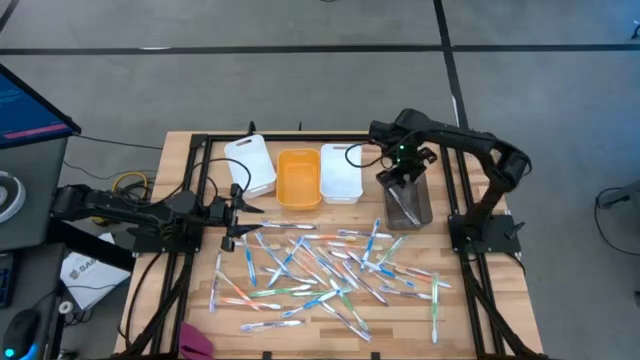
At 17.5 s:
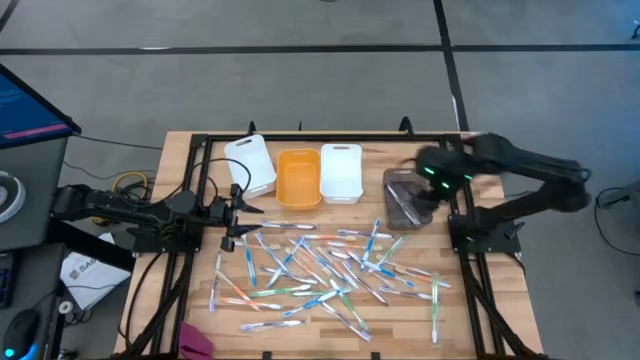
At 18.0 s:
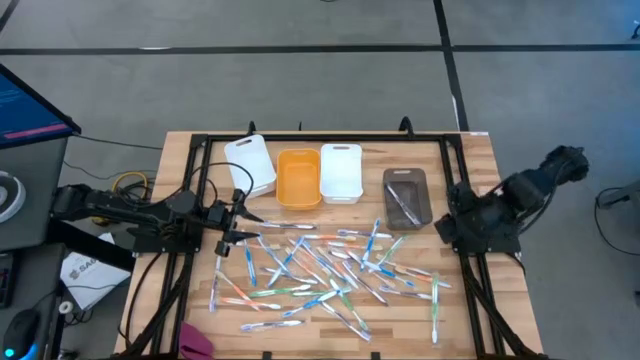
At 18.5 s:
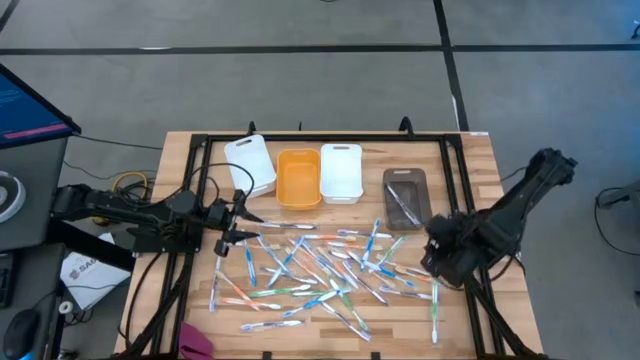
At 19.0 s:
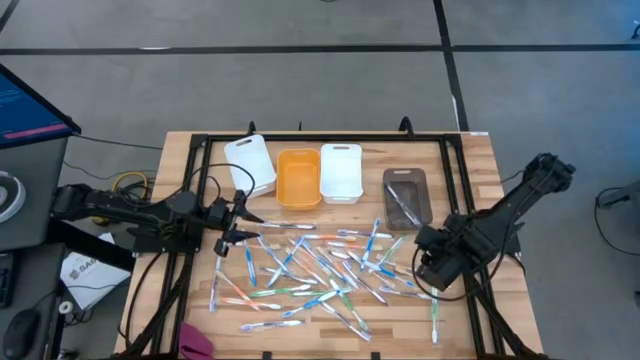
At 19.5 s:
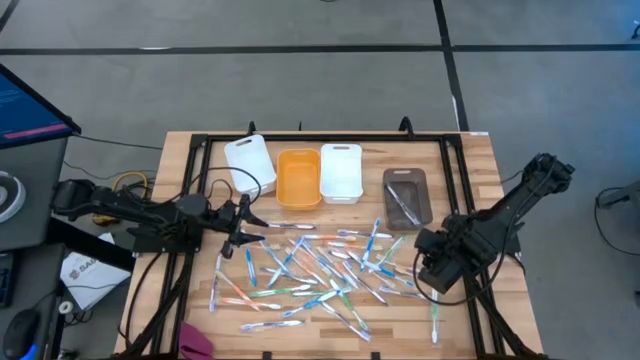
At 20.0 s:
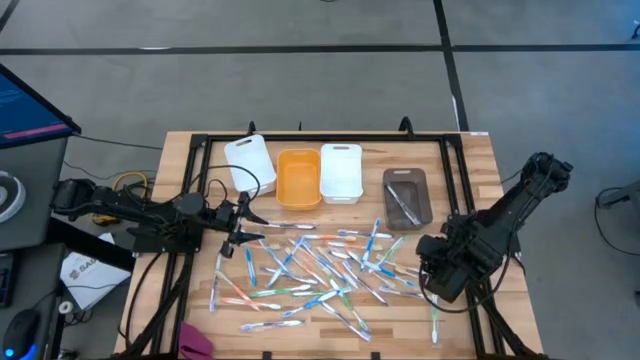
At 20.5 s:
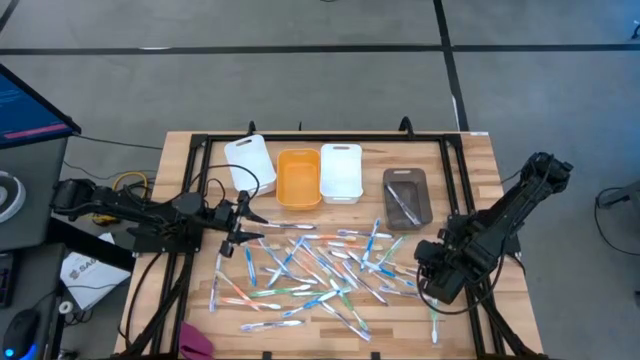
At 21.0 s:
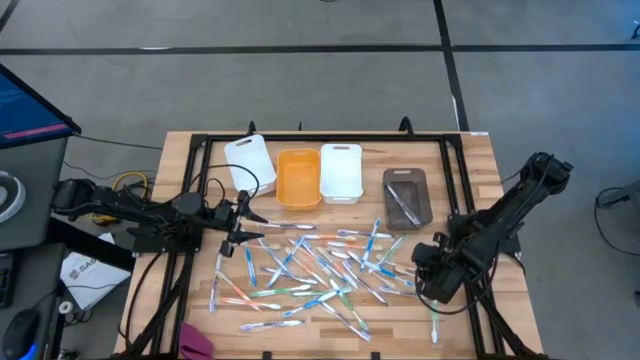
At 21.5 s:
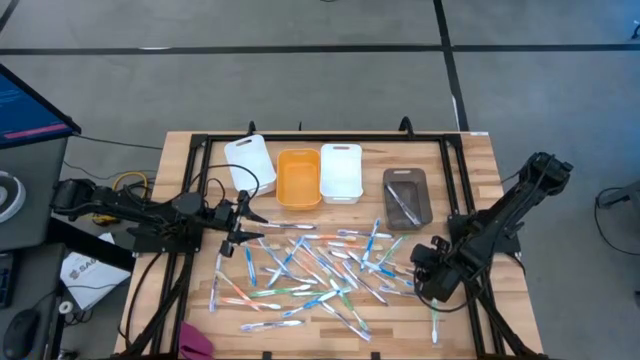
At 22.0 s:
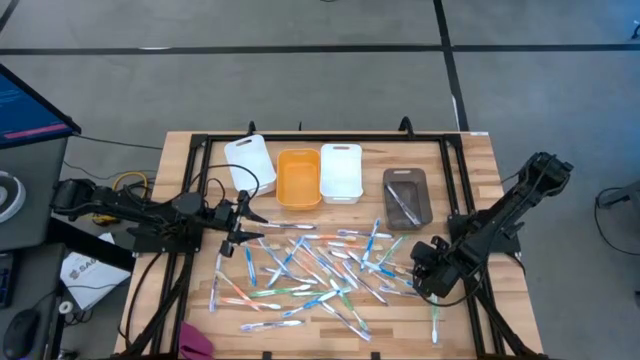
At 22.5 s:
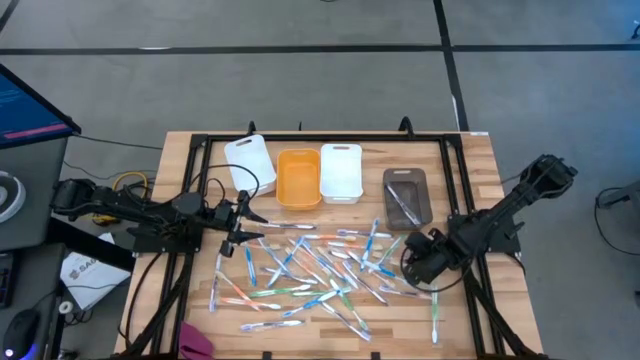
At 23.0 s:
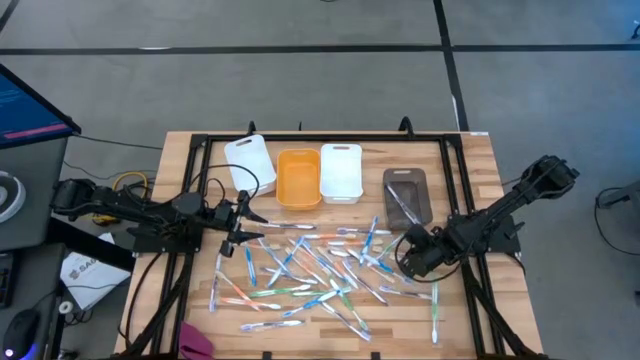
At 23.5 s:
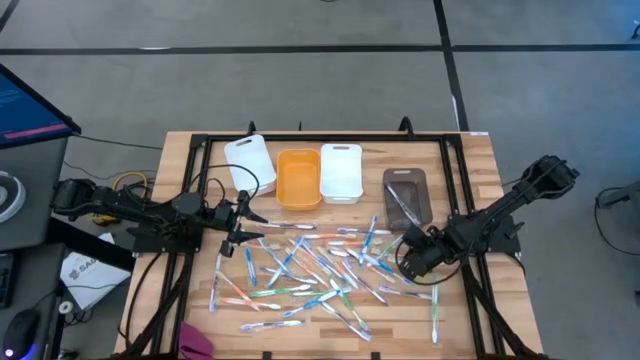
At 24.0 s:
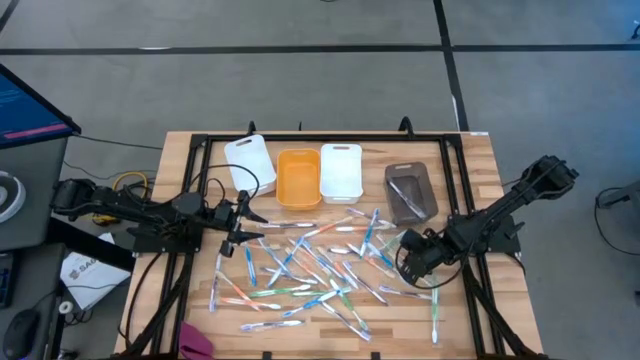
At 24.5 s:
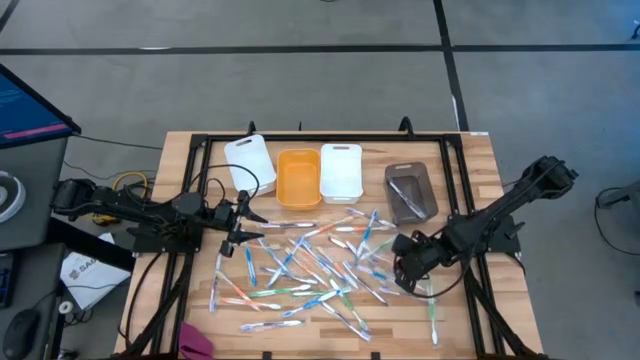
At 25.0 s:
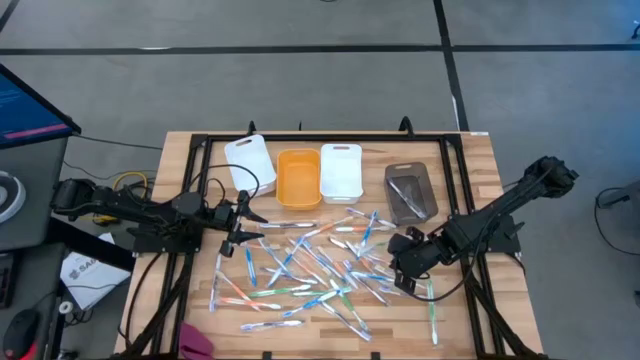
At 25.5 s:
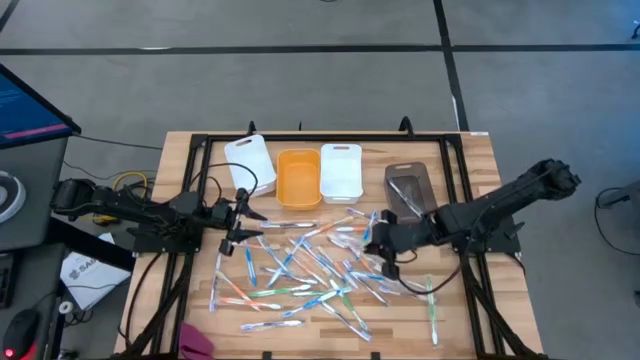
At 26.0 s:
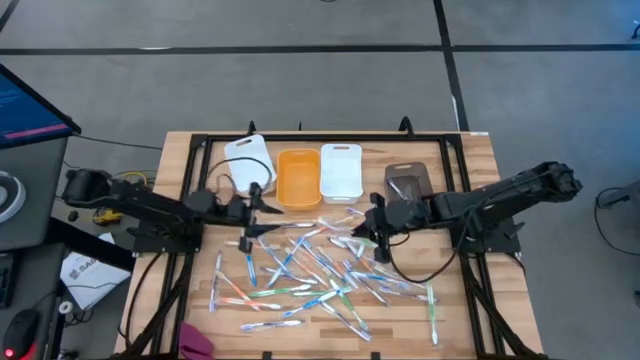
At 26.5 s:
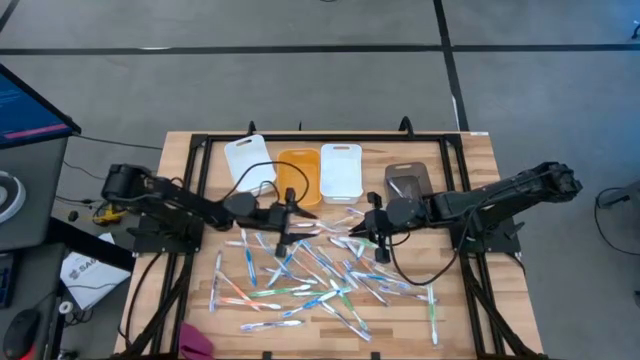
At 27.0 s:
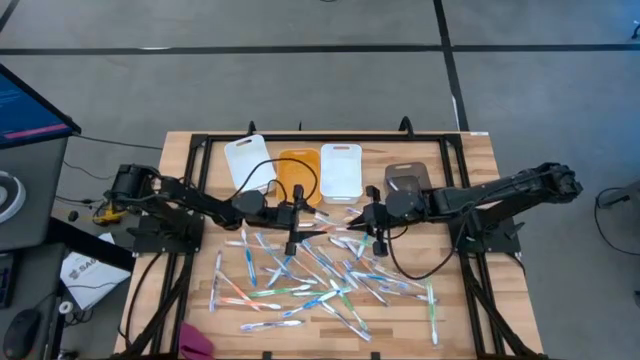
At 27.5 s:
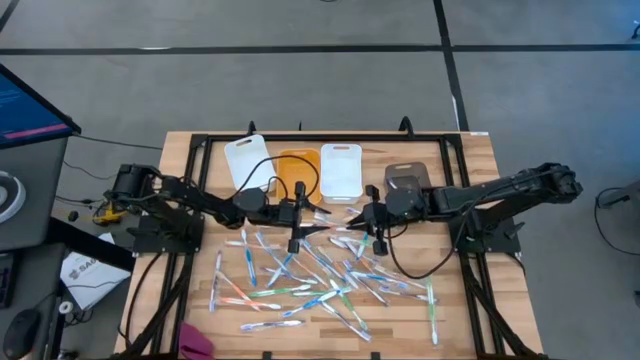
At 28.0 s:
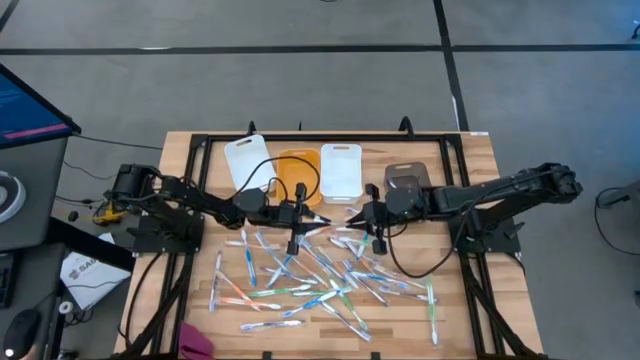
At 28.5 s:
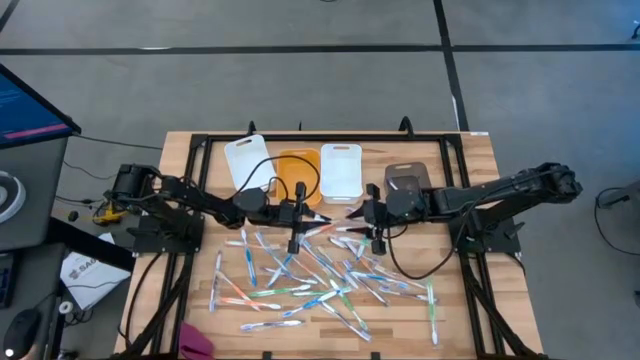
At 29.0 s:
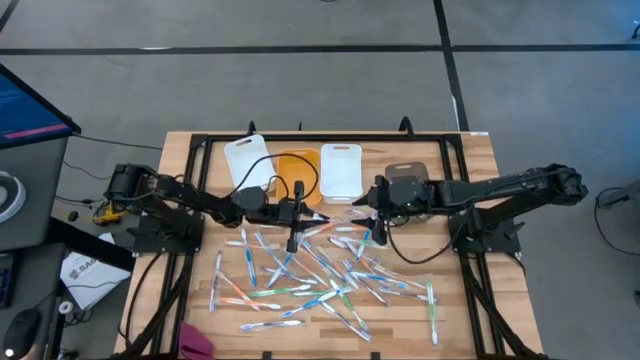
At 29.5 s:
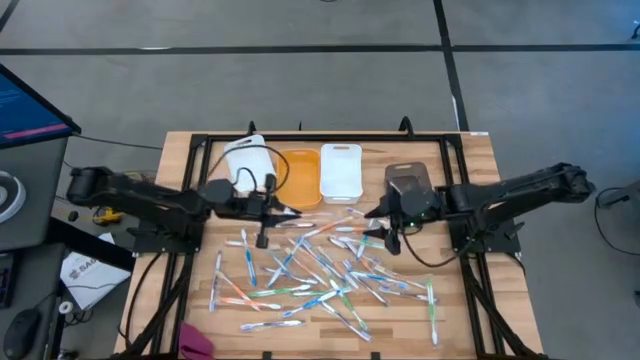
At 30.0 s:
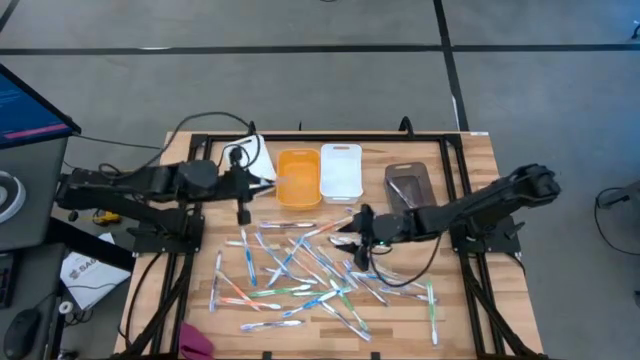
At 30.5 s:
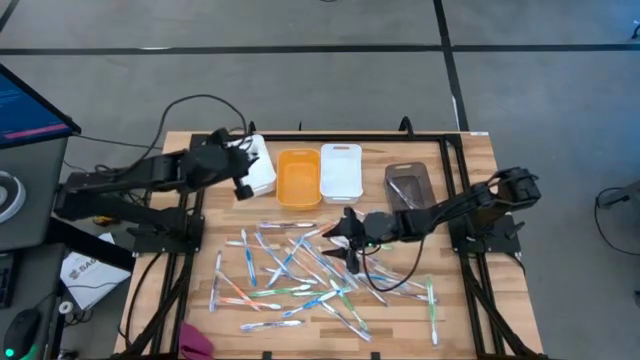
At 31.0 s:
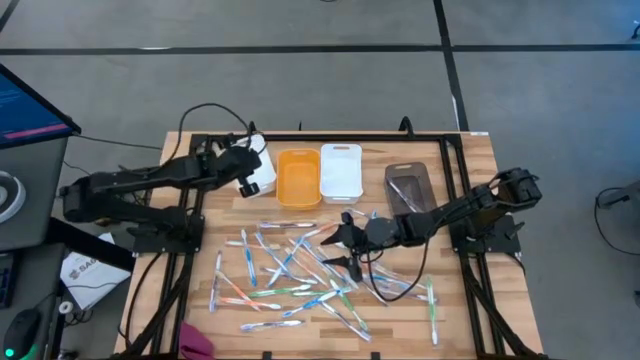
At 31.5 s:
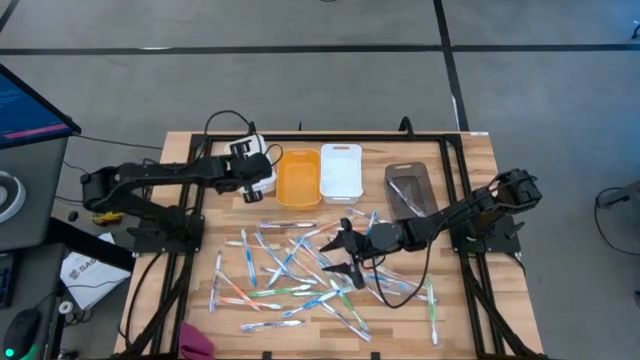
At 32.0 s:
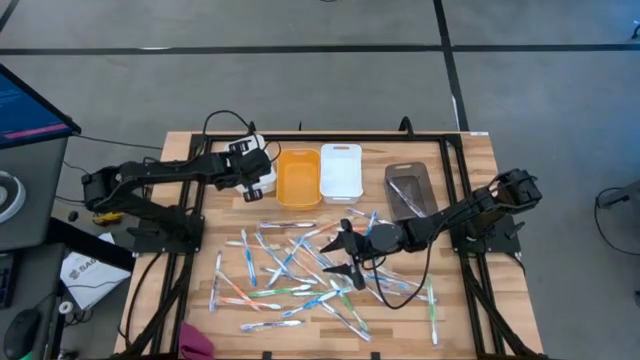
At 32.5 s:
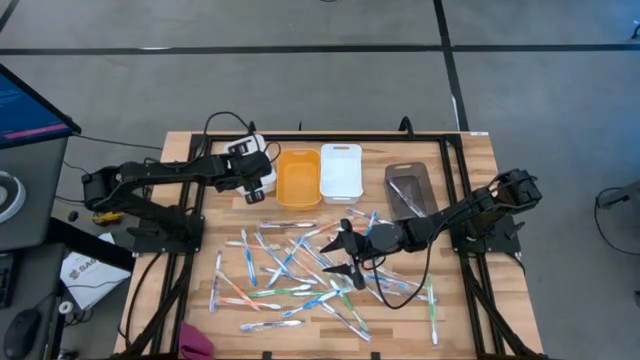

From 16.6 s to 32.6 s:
Task: Pick & Place Toothbrushes
Put the white orange toothbrush into the left white bin

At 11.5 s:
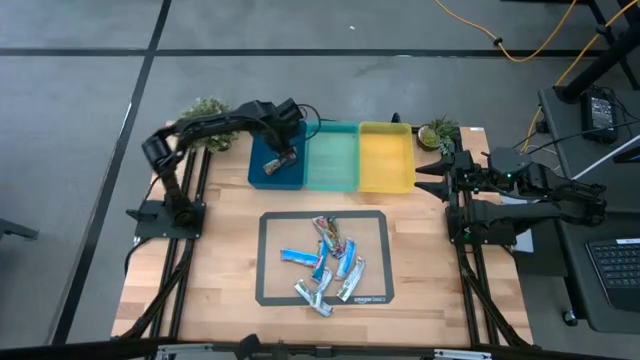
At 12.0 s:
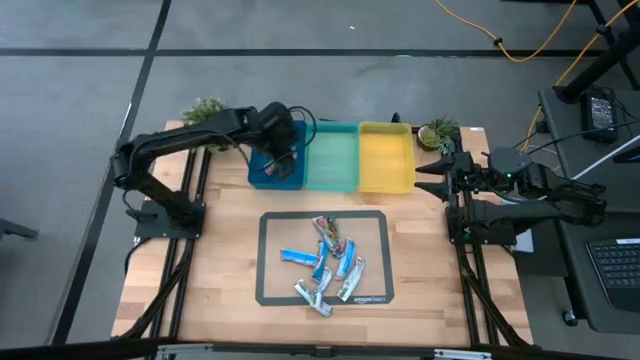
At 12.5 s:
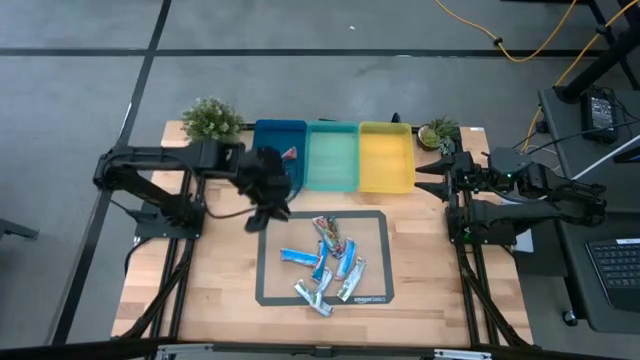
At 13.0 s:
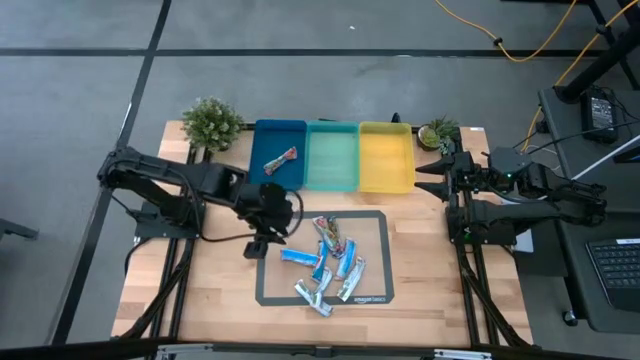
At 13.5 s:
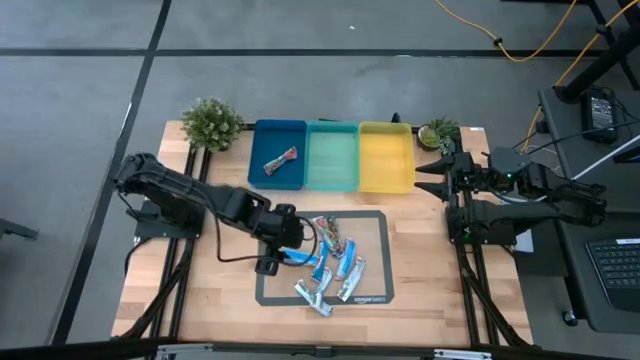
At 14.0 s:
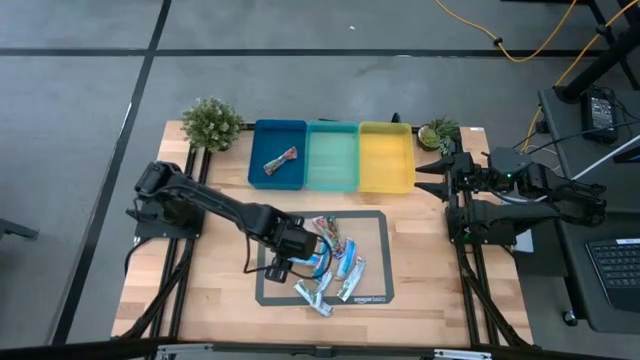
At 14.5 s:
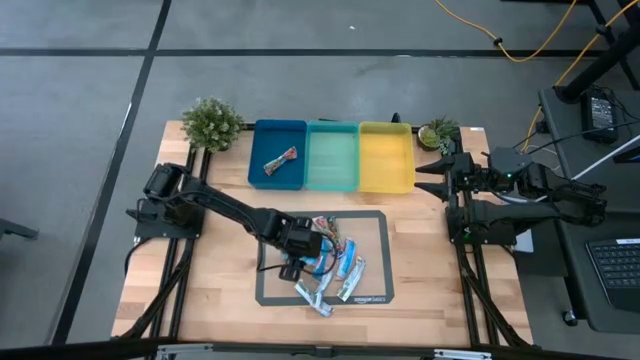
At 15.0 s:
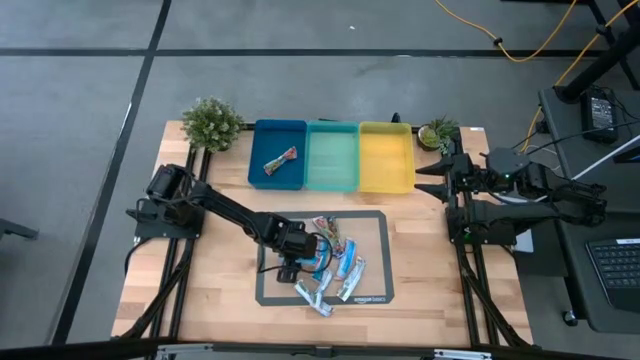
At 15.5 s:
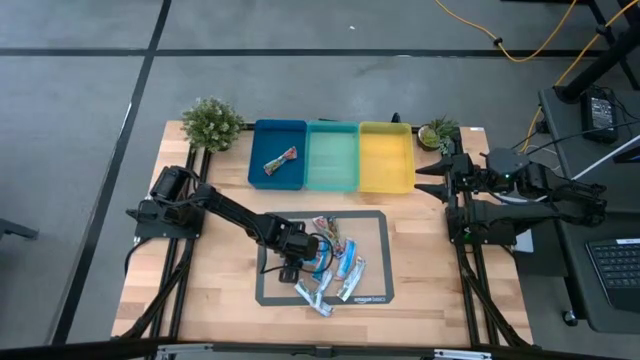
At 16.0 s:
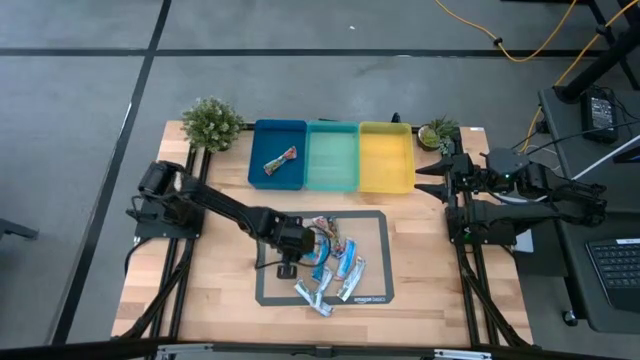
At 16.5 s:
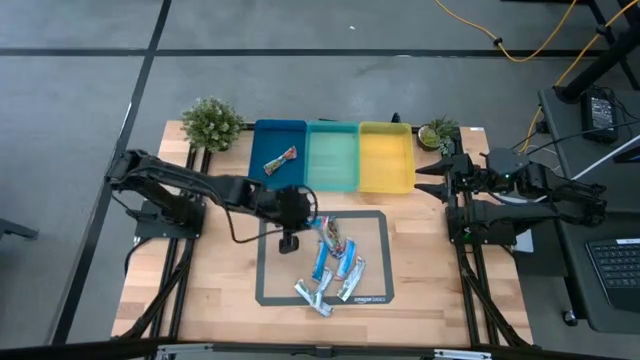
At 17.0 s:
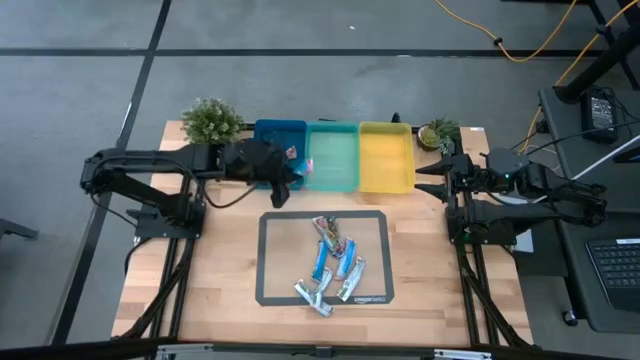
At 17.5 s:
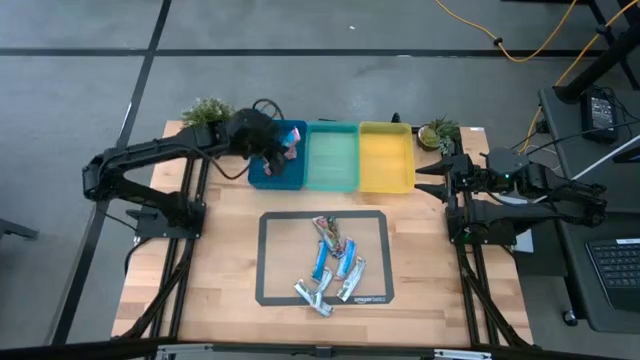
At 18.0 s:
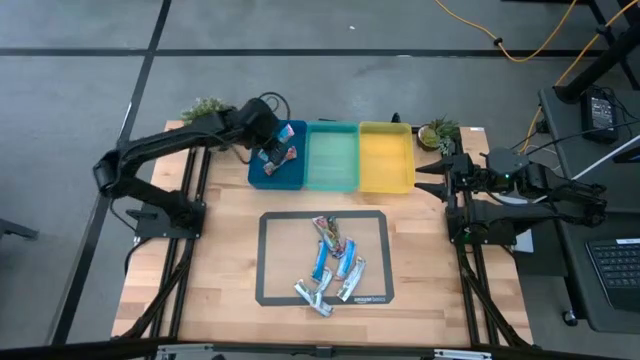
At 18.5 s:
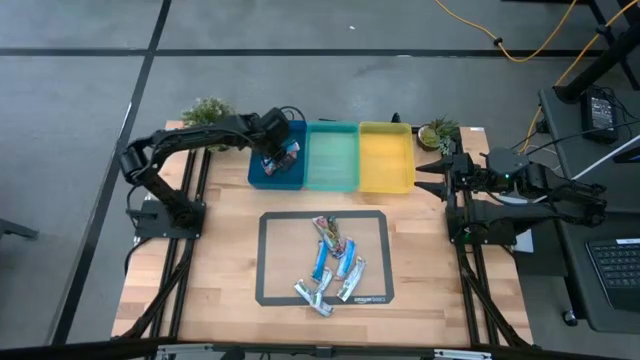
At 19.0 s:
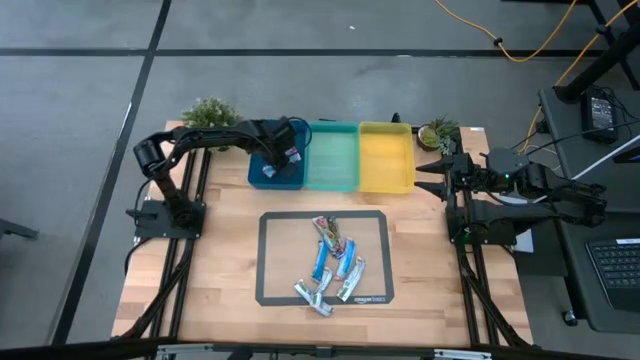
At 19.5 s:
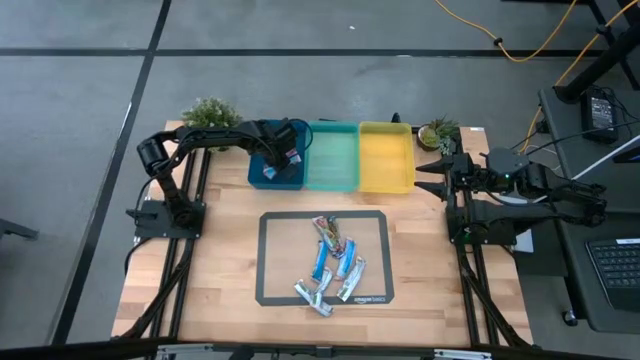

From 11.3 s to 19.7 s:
Task: Pick and place Granola Bars by type
Put the red granola bar into the blue bin
